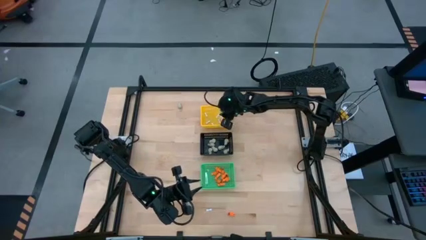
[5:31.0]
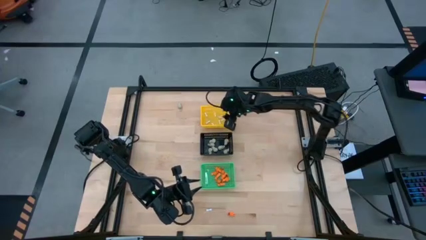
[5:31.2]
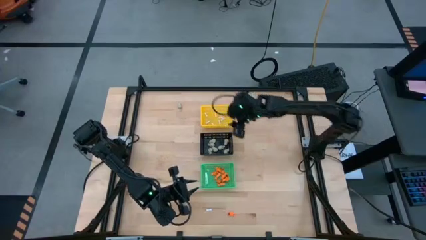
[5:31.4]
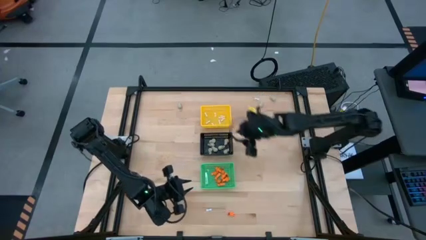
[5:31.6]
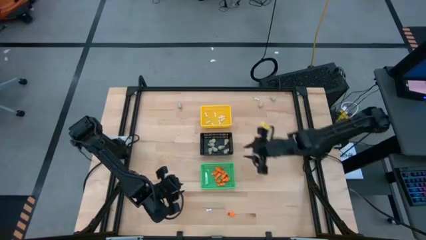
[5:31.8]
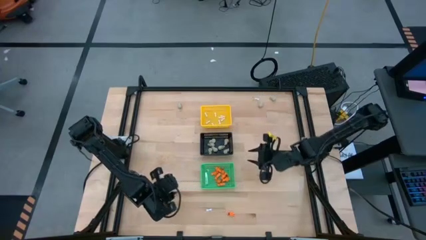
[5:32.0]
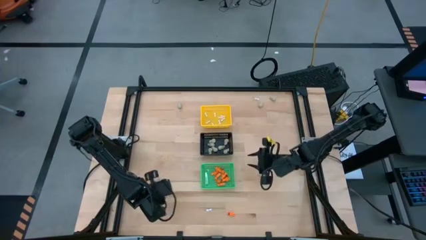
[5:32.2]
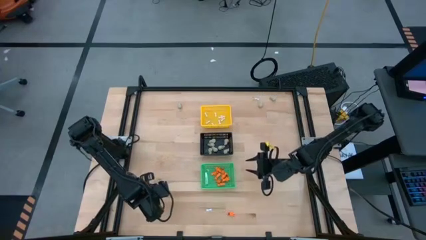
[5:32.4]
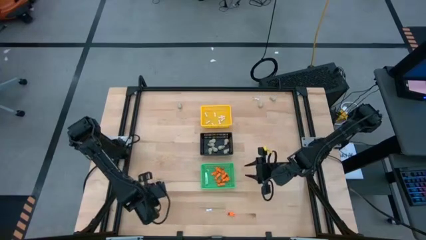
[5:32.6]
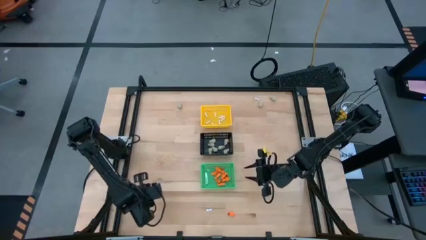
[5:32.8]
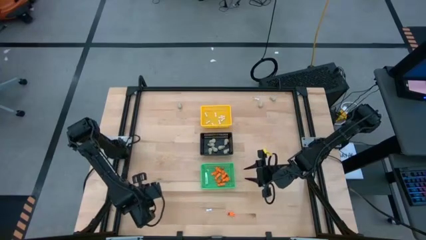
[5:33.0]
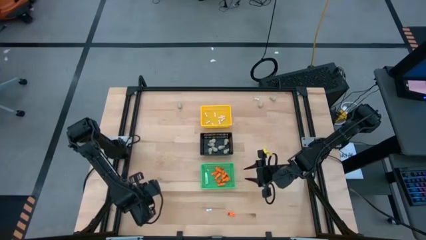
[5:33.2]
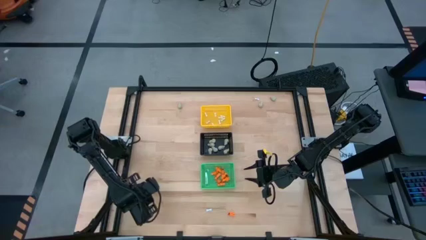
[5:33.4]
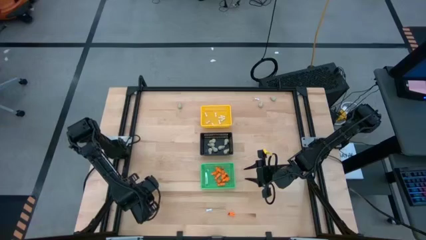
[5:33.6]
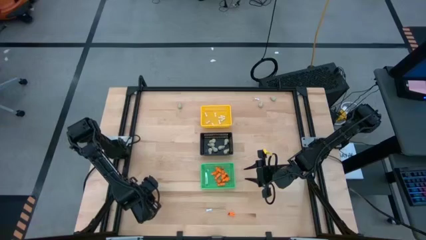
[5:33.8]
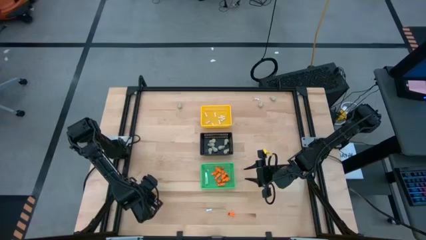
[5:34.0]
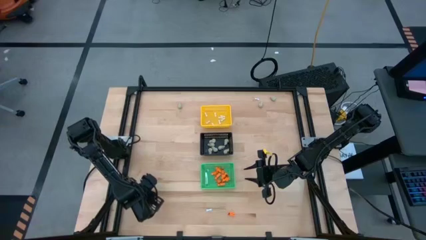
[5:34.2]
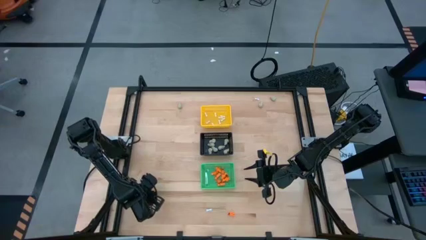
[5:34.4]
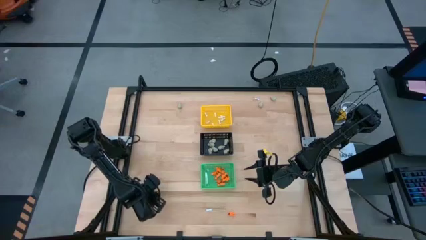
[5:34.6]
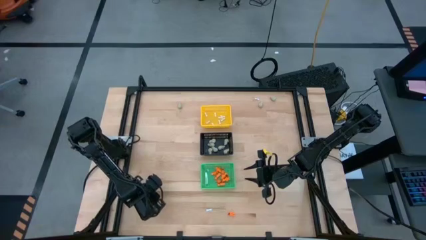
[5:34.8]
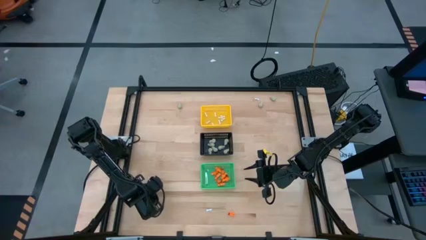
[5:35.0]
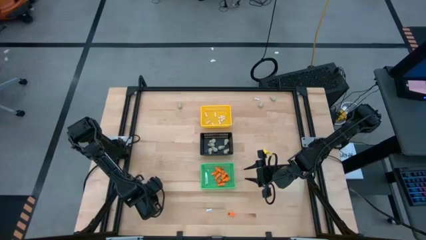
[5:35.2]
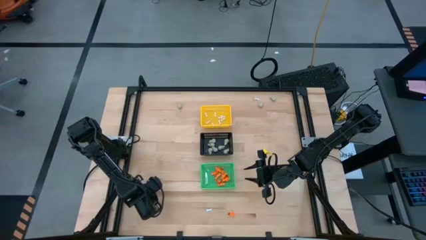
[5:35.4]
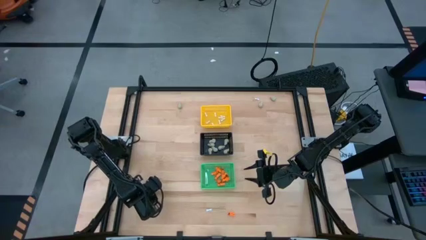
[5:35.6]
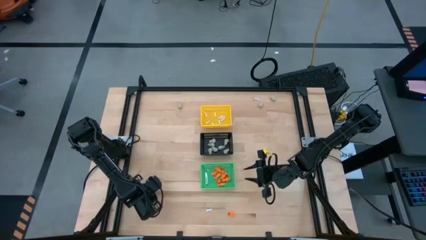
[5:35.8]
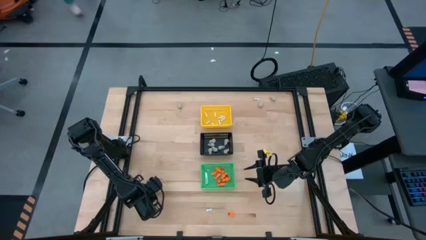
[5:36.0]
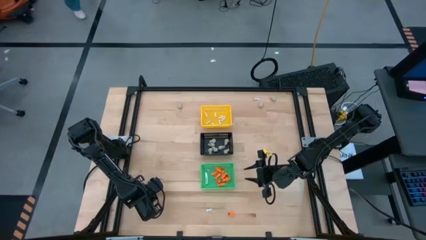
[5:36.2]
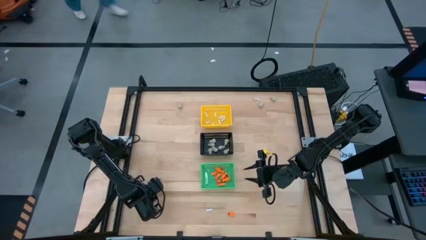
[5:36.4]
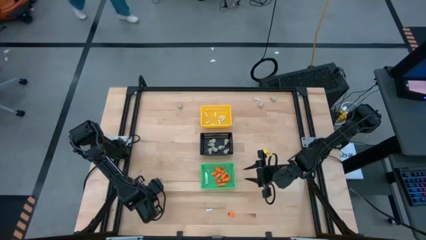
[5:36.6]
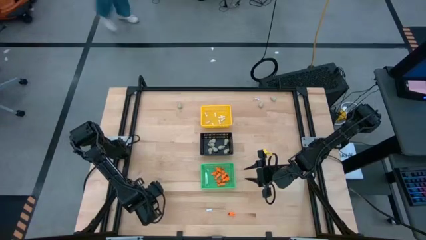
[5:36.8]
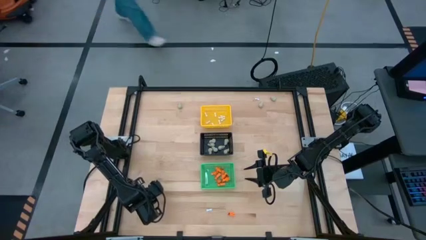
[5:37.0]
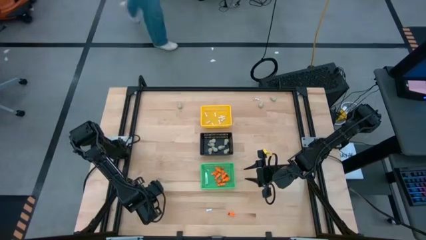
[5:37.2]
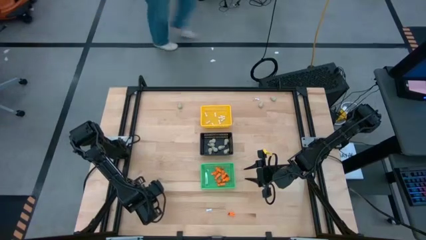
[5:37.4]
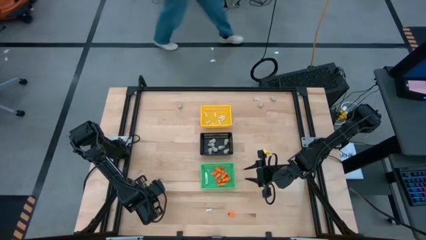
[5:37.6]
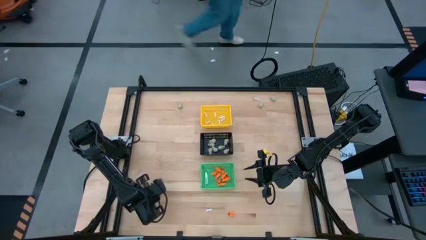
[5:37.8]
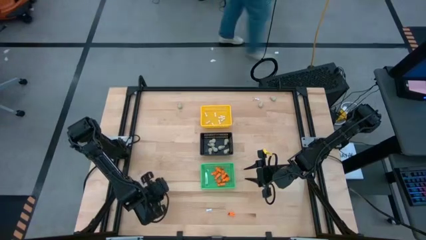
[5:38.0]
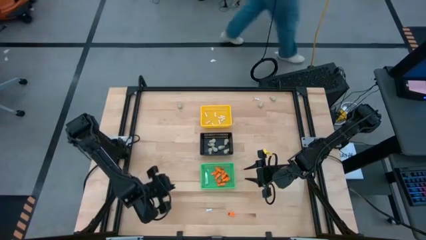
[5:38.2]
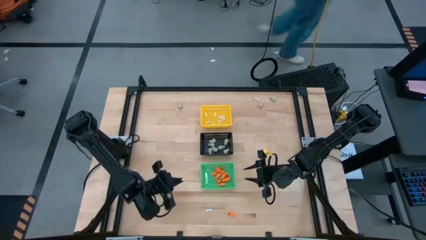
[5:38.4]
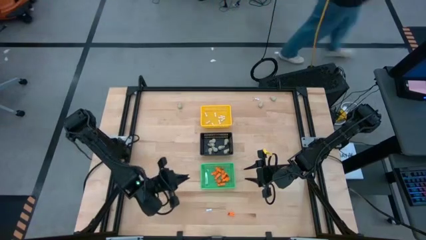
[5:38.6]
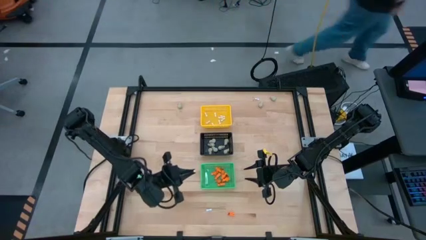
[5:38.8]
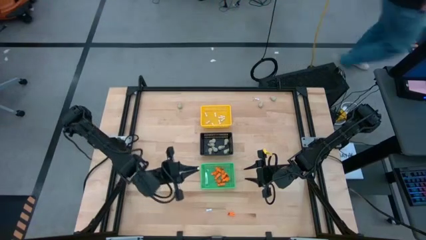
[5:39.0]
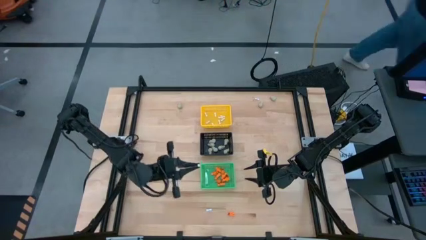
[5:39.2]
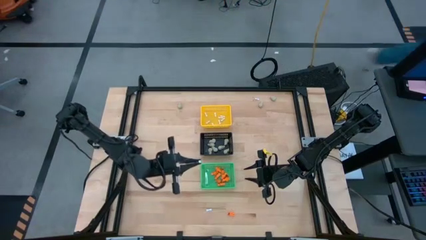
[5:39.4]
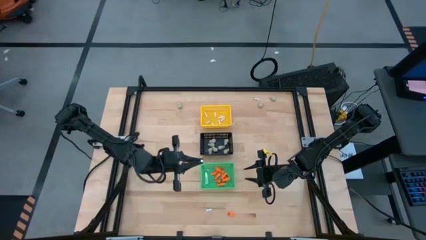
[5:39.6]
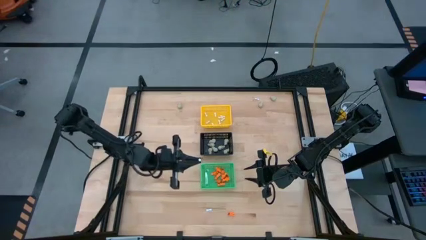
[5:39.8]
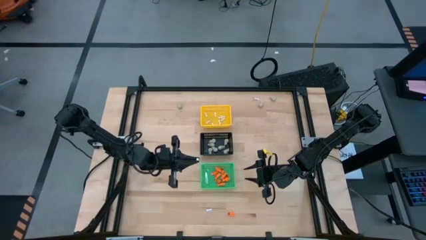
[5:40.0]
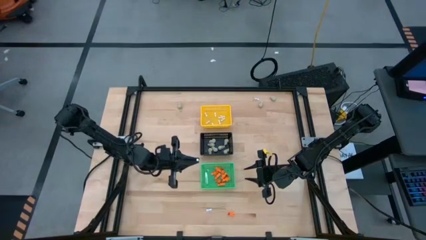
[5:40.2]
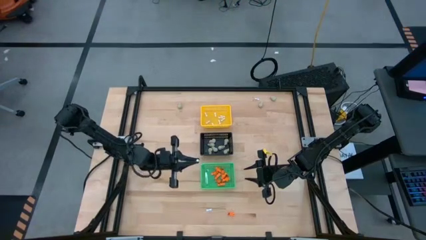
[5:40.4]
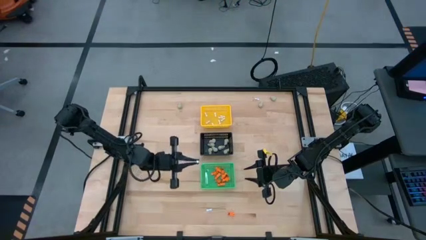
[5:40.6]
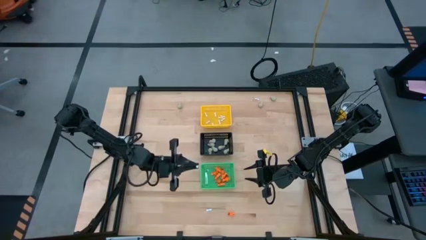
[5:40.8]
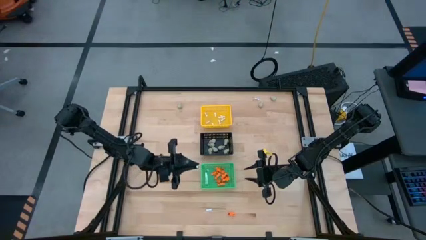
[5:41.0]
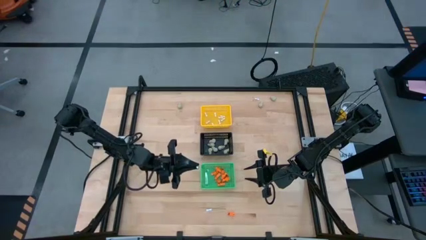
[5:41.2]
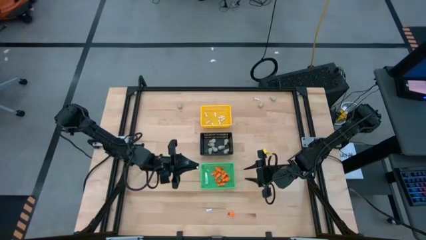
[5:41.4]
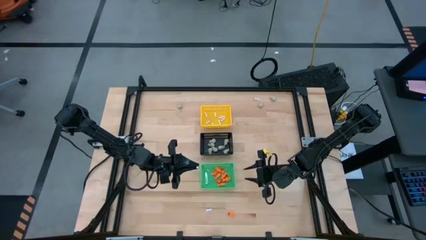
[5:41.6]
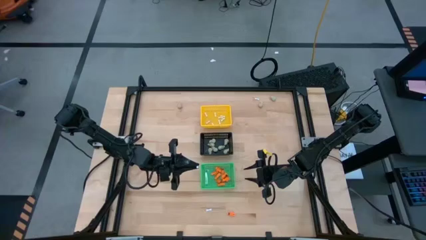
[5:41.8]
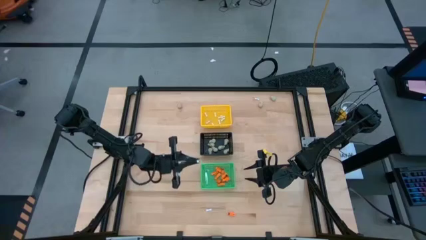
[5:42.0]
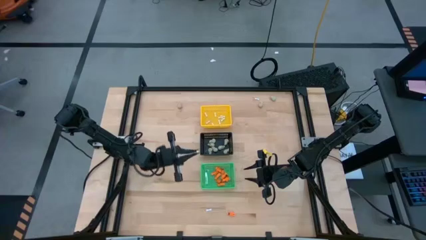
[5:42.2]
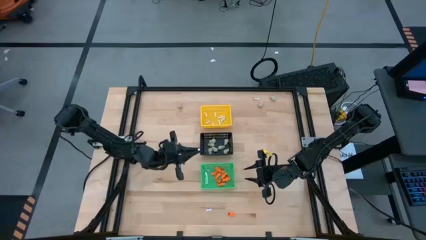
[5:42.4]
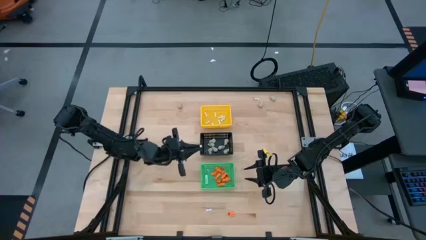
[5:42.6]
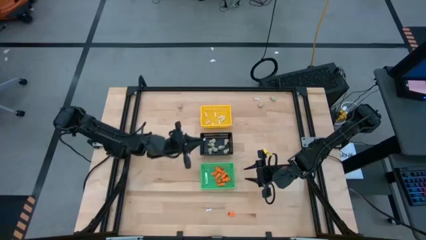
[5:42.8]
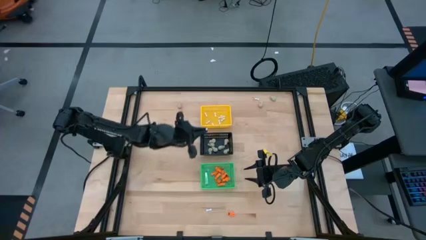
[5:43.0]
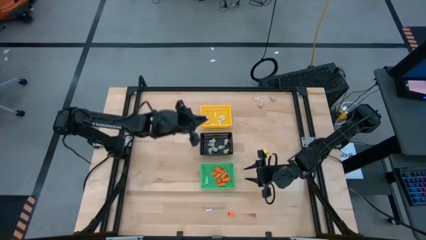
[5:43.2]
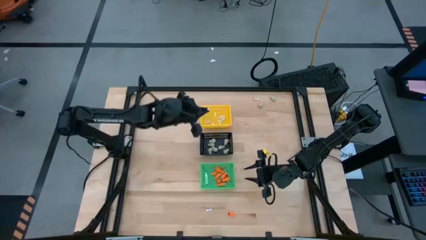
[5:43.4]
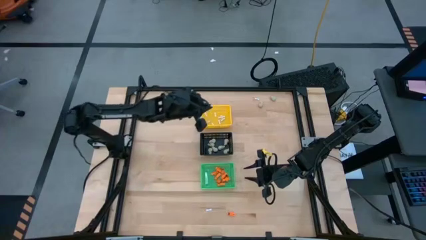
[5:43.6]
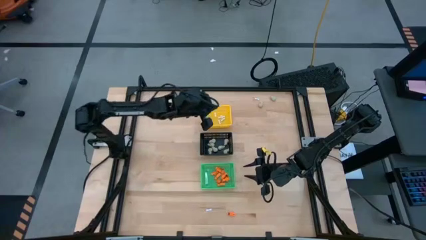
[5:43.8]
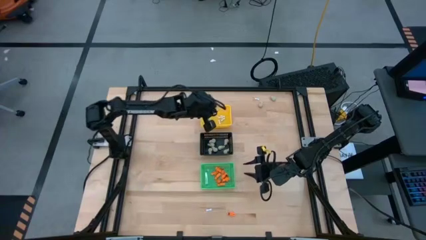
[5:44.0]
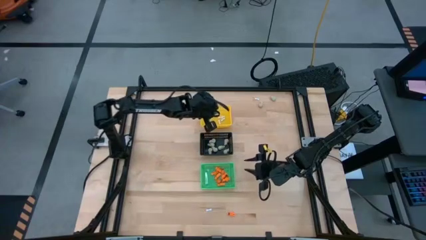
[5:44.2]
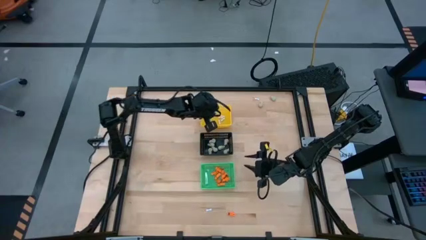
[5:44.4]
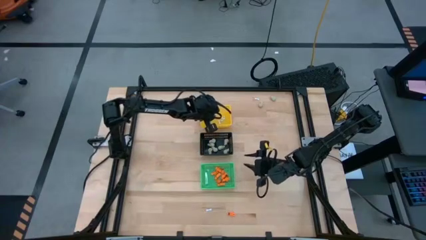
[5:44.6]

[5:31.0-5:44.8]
Task: Sort Halloween decoration
Put the white bone toy into the yellow basket
